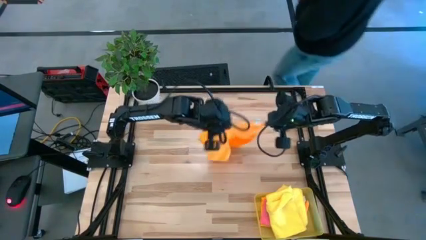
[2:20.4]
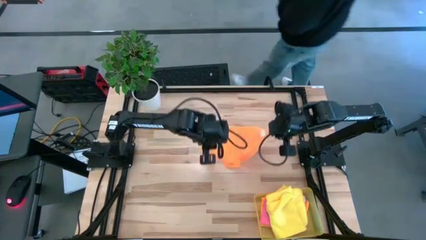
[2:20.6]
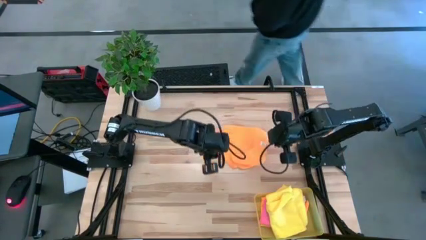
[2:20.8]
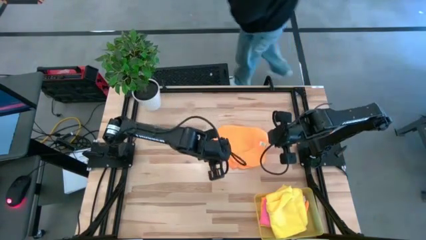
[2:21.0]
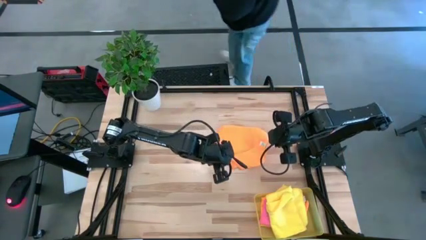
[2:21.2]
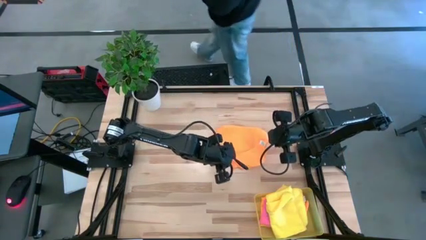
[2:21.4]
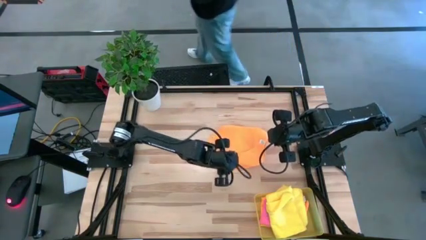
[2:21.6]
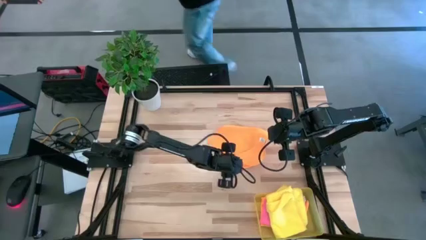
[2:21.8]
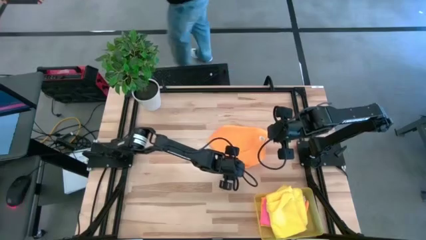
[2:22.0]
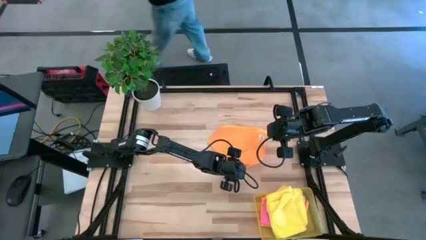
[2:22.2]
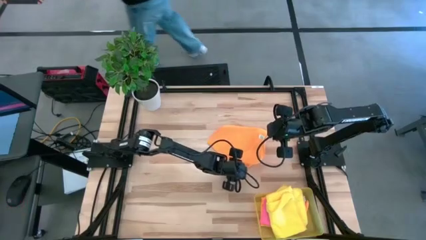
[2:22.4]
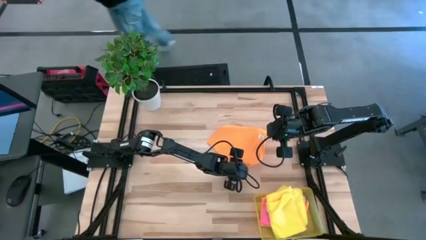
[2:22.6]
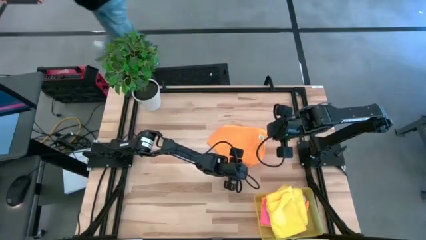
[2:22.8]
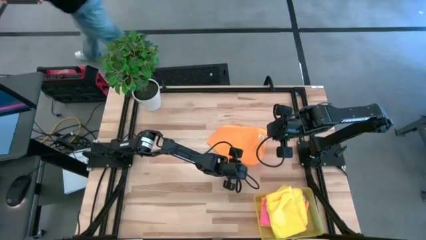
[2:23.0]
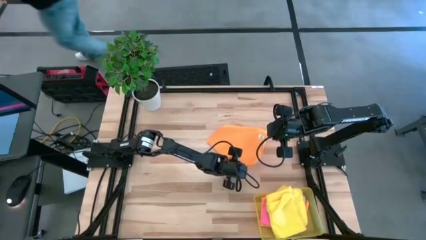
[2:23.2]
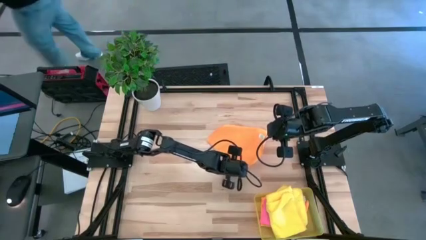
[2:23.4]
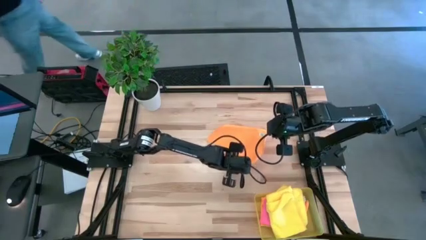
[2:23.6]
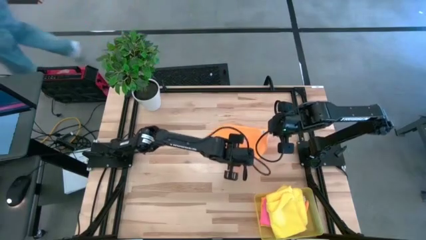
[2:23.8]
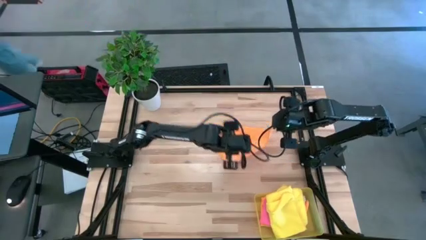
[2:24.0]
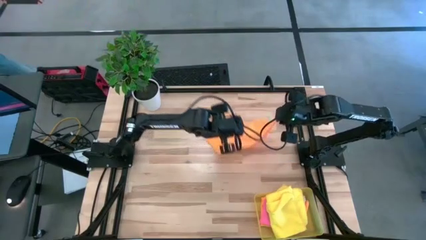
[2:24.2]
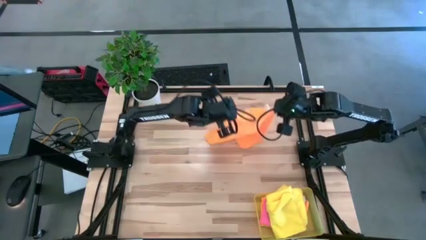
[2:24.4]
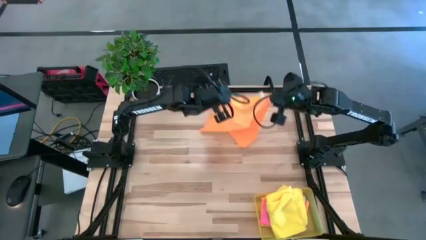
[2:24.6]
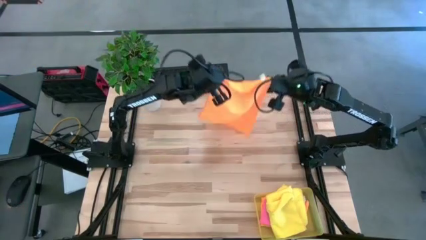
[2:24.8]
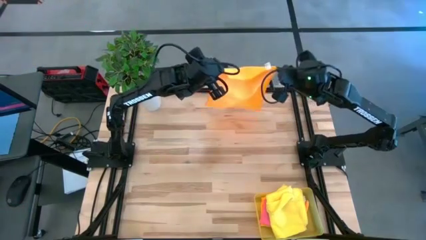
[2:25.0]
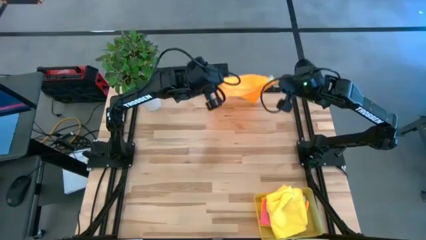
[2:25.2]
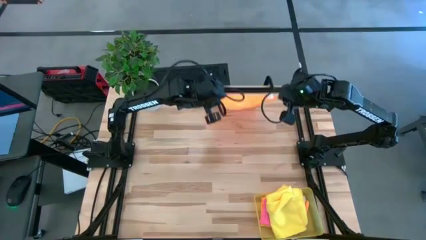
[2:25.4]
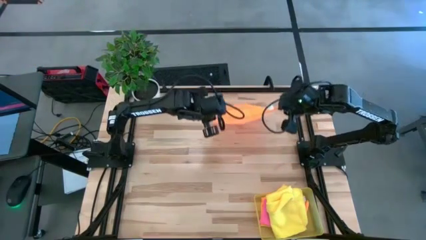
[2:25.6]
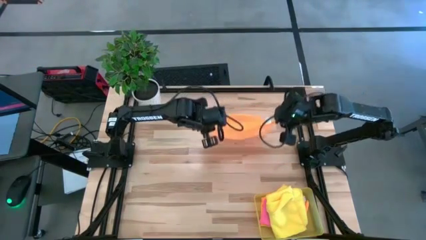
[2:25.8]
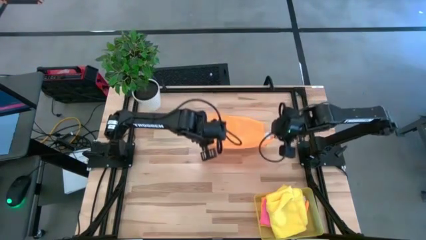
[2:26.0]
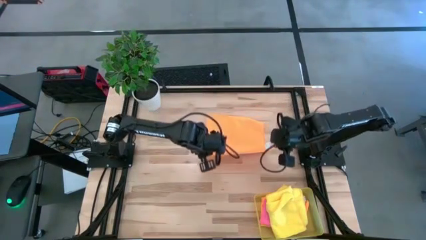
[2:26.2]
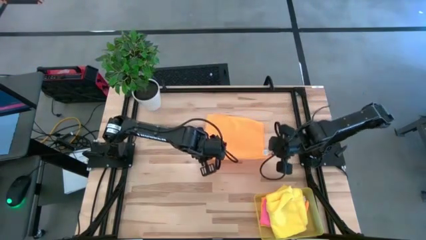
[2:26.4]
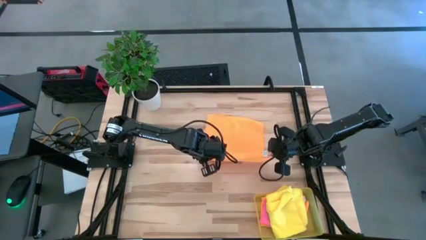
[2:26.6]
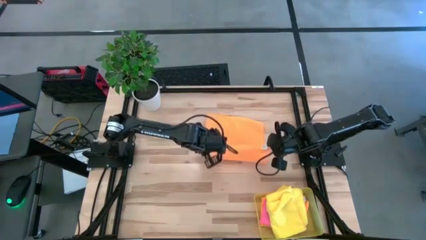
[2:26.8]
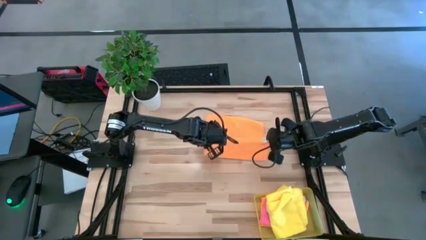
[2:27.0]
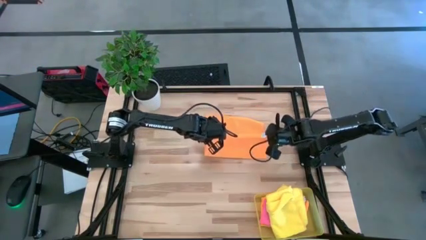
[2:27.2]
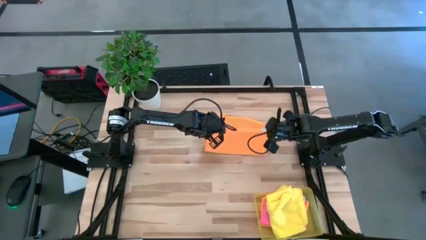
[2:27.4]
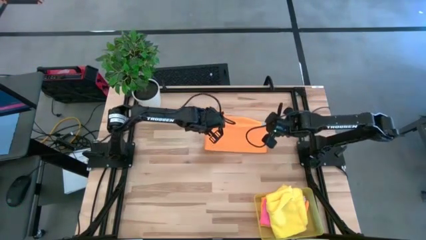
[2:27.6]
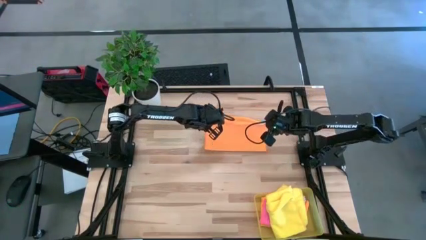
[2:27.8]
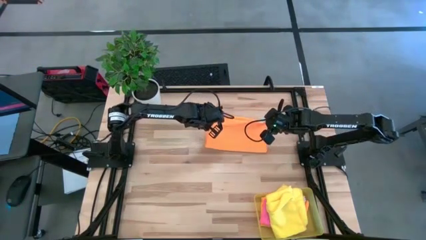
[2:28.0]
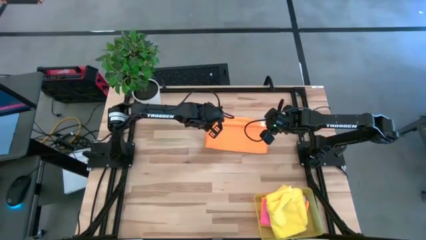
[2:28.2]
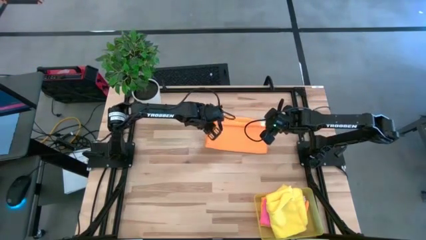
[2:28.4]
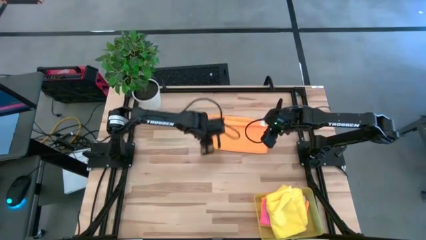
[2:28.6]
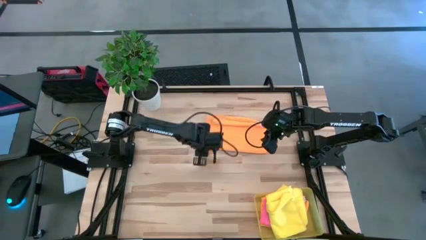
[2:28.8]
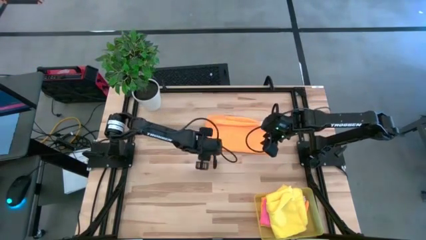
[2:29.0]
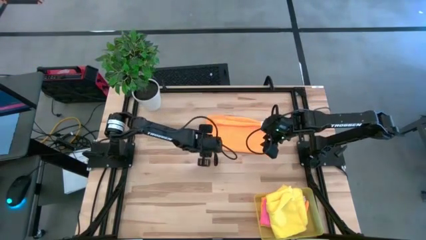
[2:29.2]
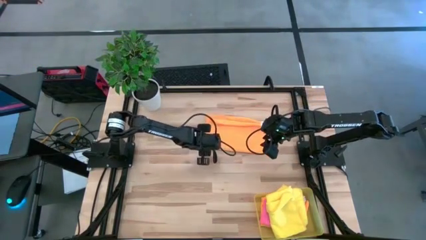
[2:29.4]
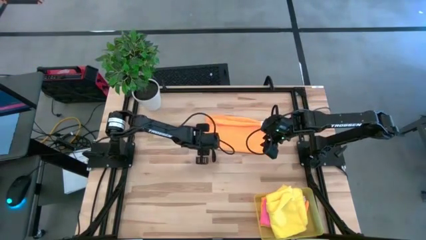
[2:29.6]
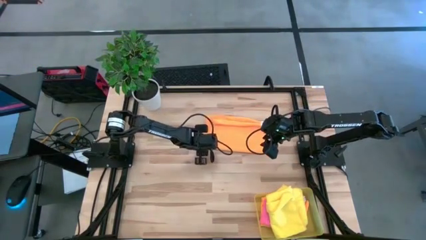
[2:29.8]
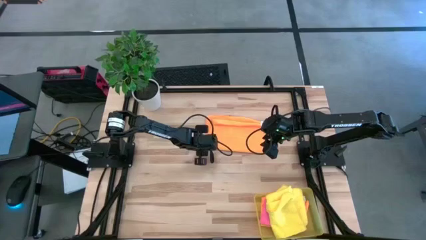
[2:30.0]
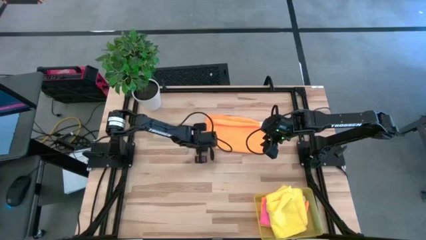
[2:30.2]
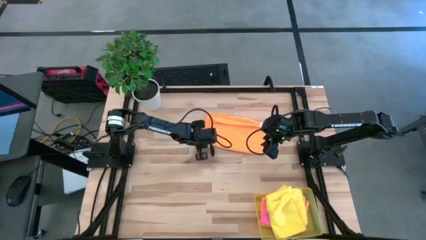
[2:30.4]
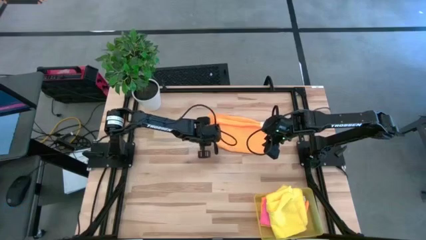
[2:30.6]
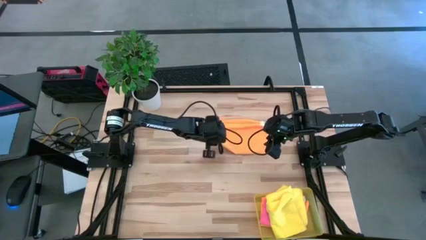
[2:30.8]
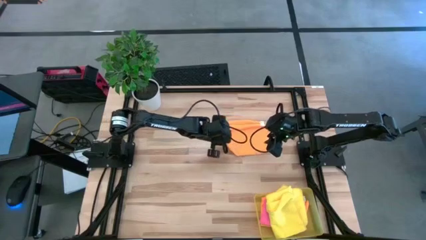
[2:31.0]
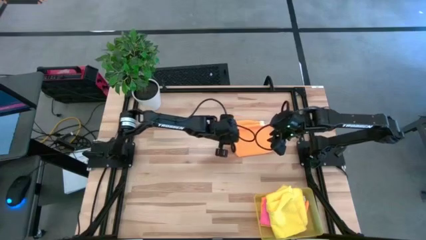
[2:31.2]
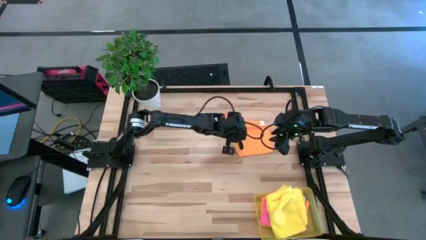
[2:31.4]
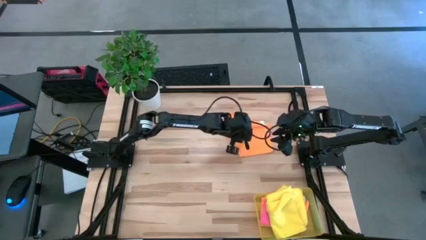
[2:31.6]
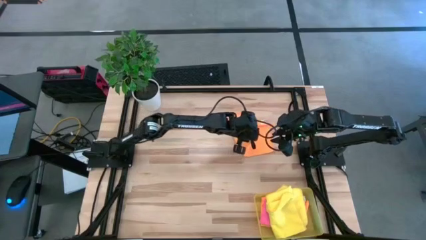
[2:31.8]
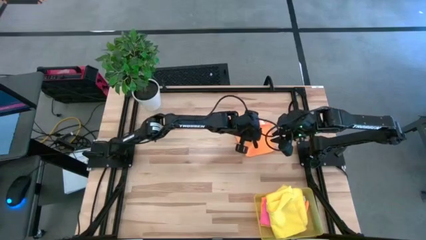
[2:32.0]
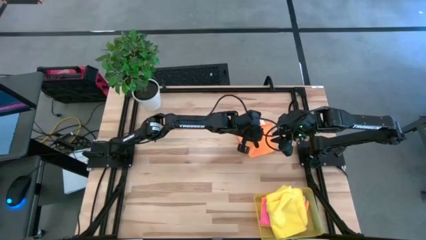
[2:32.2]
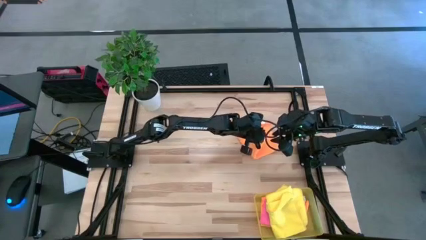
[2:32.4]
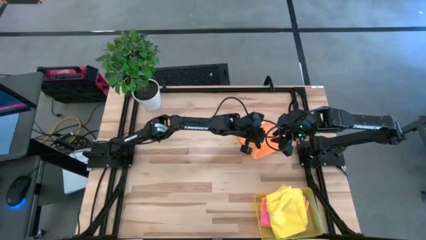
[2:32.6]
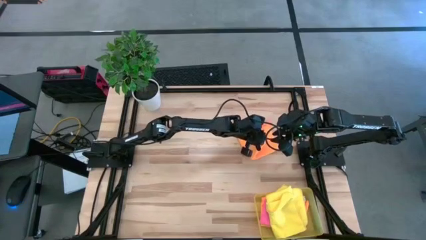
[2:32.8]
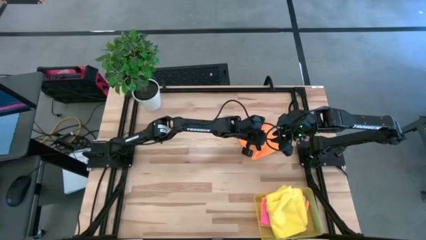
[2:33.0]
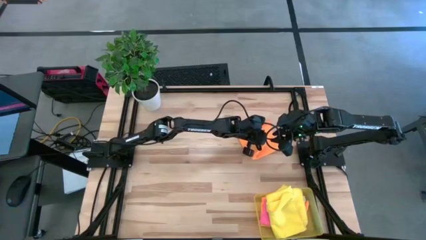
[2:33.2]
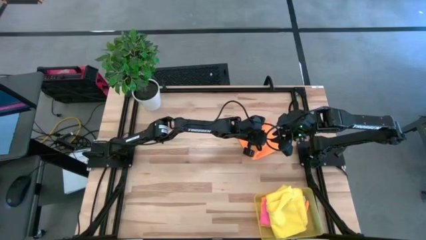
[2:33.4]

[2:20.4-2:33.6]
Task: Fold microfiber towels
Fold the orange microfiber cloth

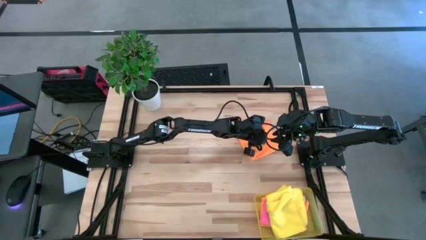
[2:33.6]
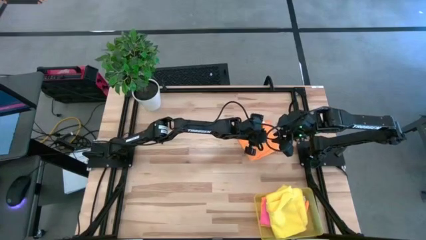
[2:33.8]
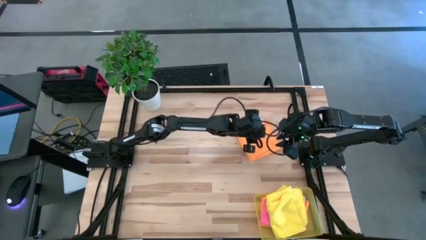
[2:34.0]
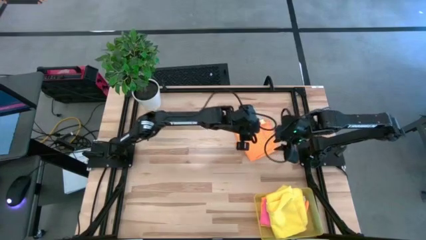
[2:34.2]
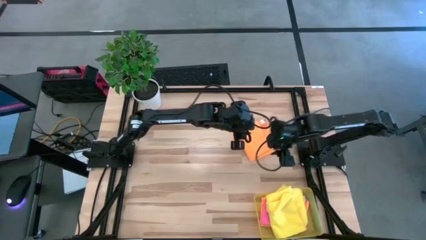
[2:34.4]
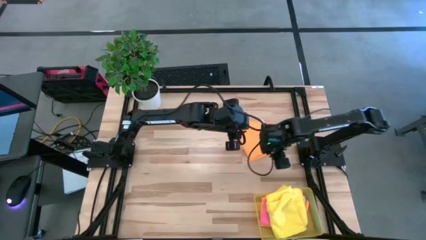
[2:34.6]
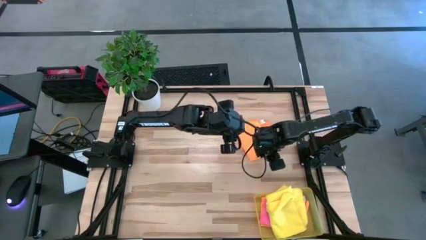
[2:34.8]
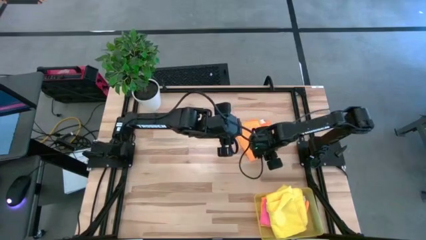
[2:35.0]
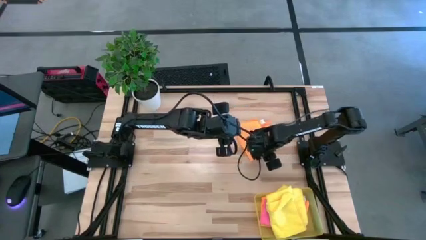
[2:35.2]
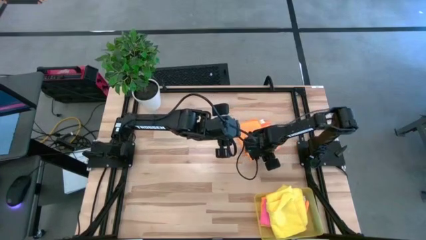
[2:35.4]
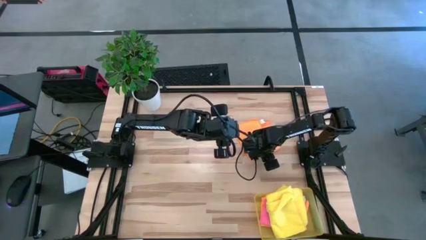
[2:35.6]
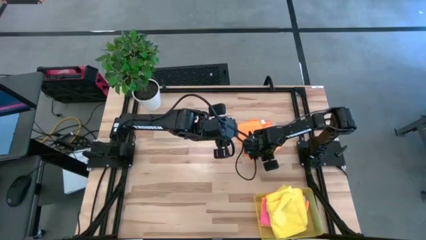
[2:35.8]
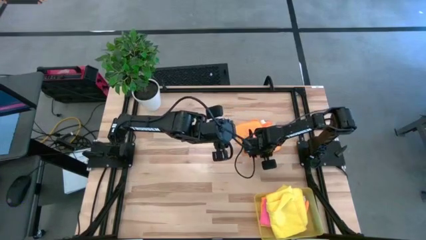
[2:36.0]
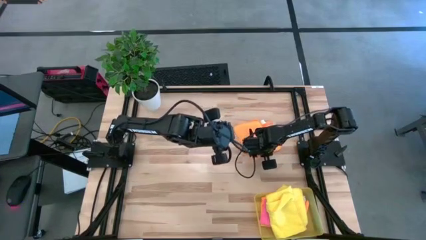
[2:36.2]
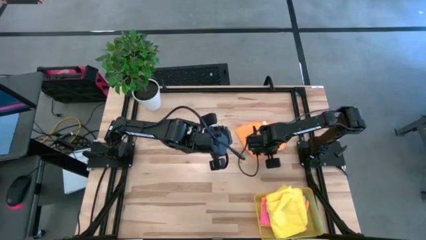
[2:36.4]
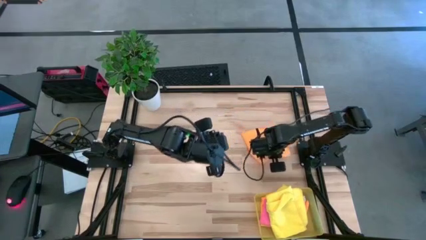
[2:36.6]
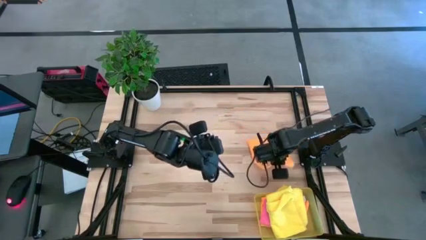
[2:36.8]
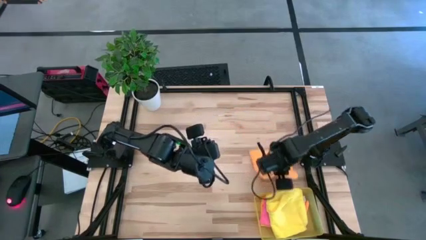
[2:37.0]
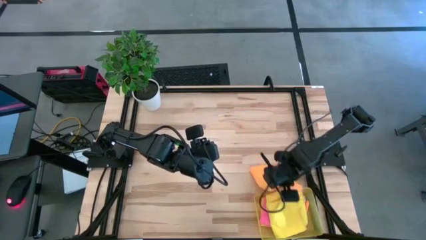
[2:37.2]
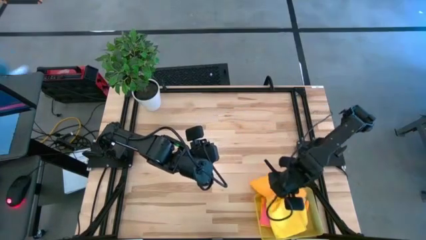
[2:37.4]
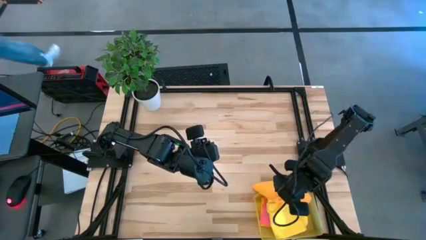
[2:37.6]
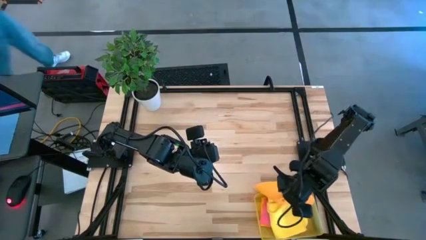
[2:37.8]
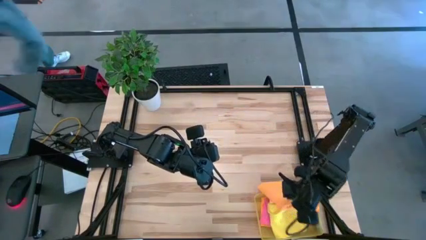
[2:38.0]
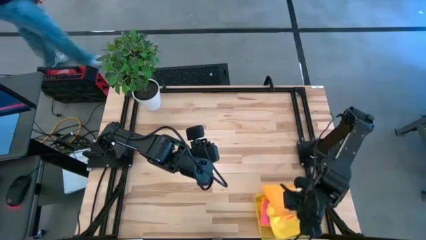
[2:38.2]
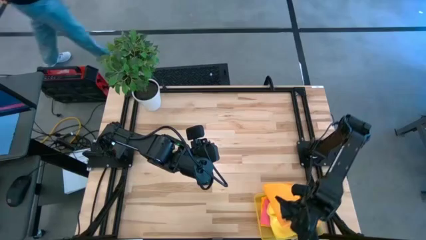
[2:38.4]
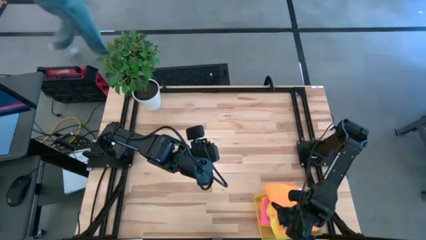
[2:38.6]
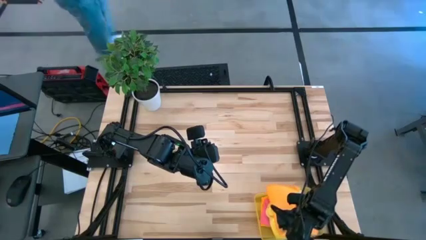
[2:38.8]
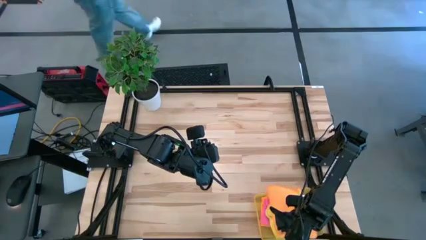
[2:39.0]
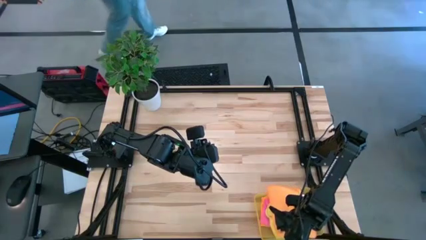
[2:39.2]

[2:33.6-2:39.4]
Put the orange microfiber cloth into the bin
